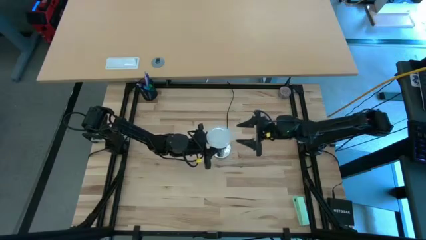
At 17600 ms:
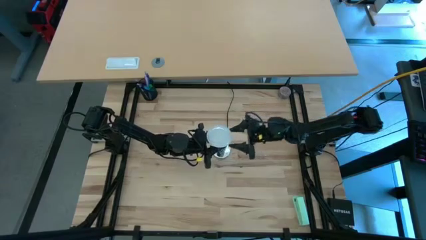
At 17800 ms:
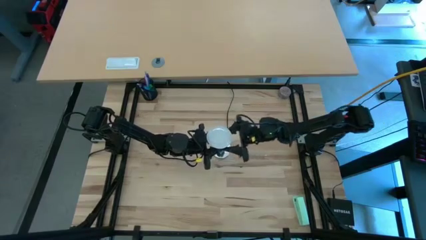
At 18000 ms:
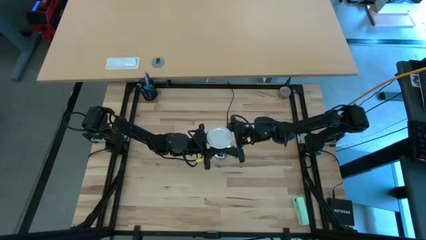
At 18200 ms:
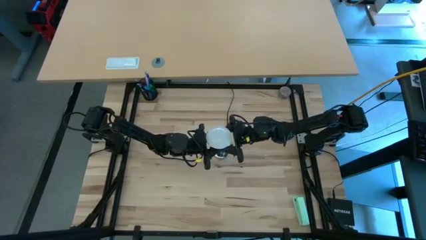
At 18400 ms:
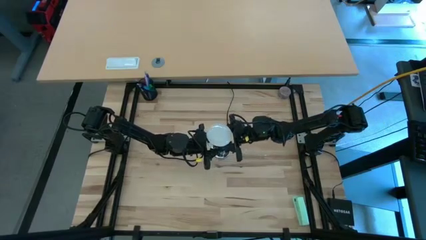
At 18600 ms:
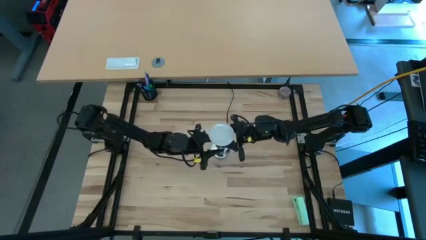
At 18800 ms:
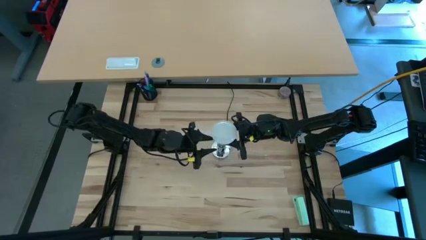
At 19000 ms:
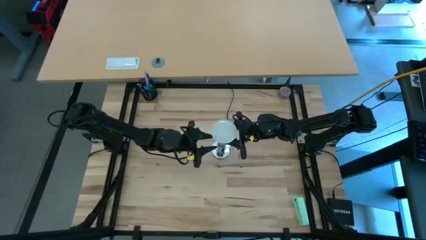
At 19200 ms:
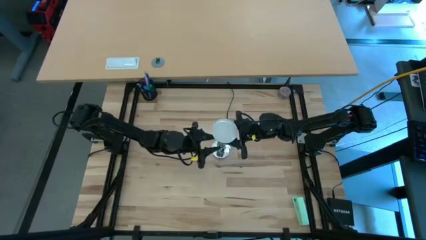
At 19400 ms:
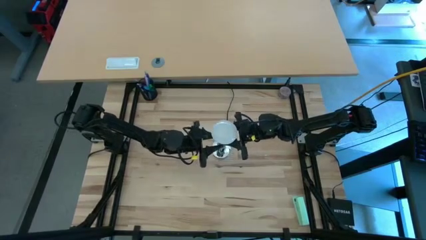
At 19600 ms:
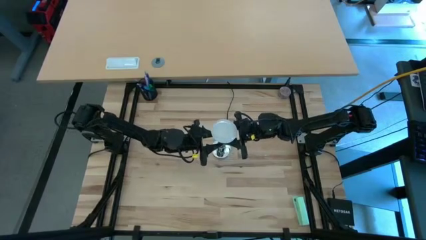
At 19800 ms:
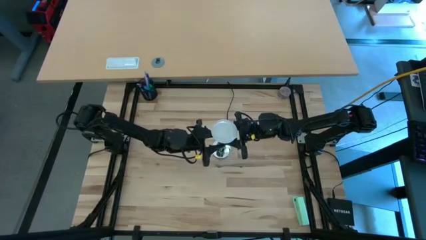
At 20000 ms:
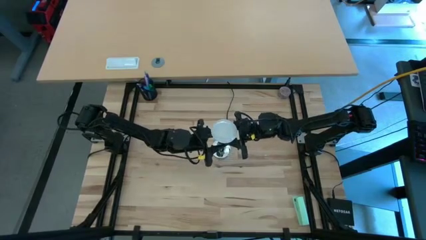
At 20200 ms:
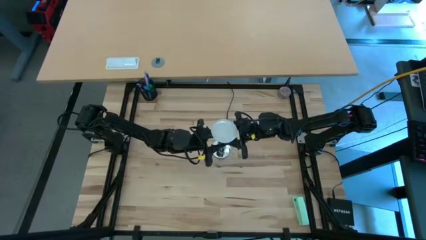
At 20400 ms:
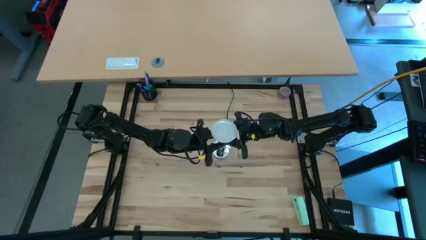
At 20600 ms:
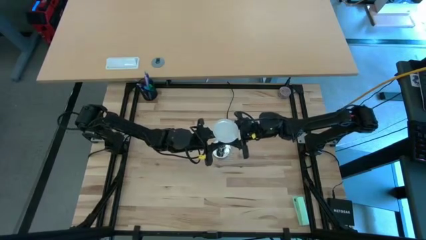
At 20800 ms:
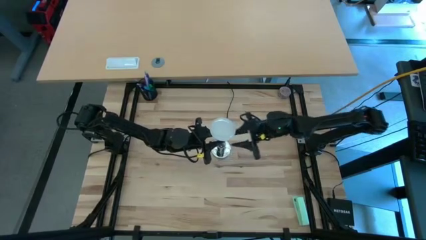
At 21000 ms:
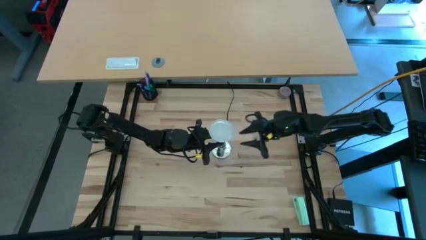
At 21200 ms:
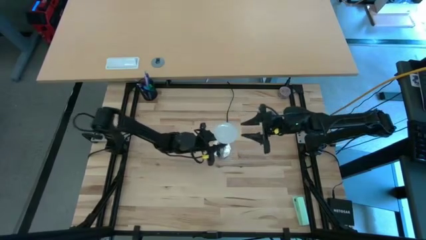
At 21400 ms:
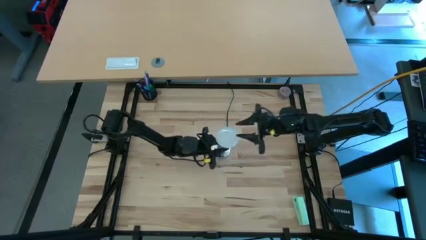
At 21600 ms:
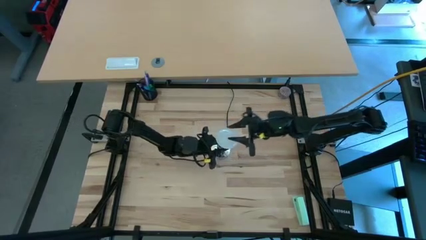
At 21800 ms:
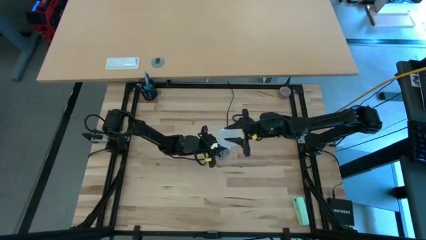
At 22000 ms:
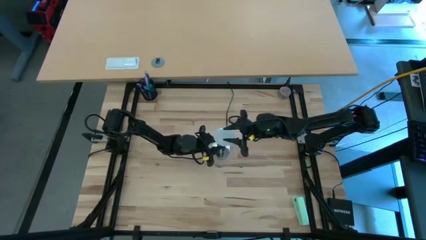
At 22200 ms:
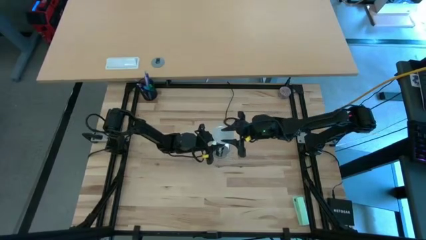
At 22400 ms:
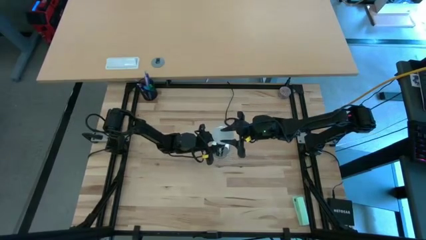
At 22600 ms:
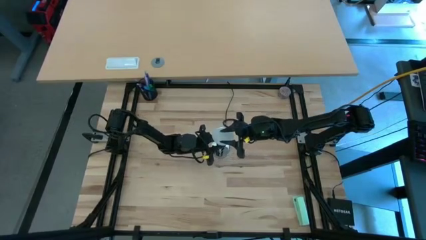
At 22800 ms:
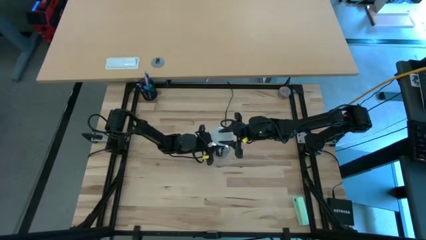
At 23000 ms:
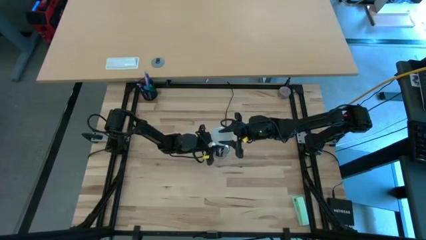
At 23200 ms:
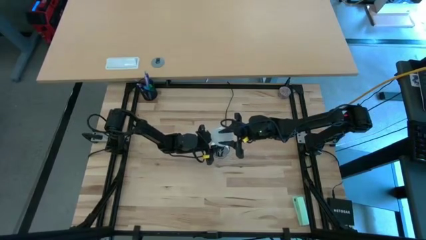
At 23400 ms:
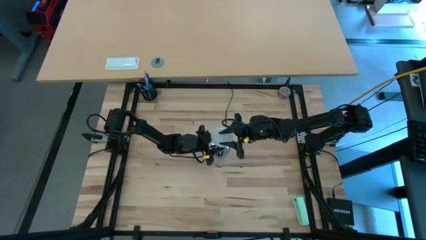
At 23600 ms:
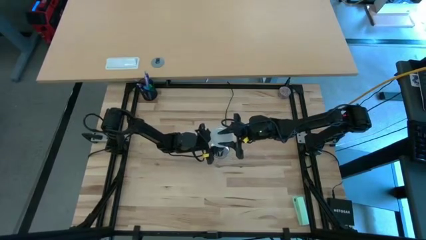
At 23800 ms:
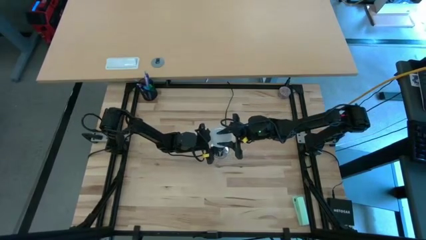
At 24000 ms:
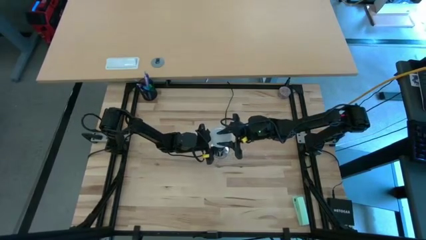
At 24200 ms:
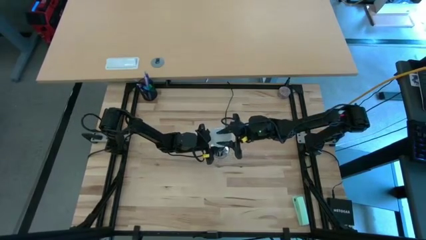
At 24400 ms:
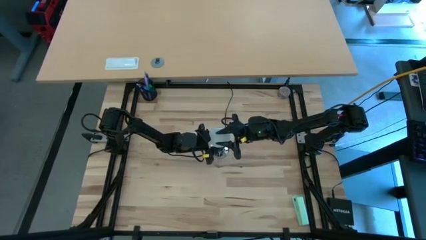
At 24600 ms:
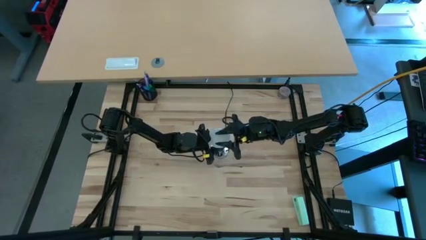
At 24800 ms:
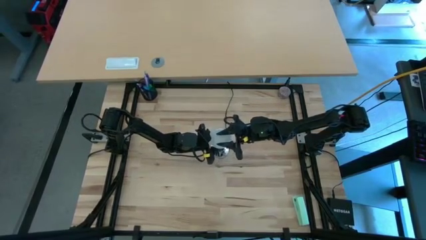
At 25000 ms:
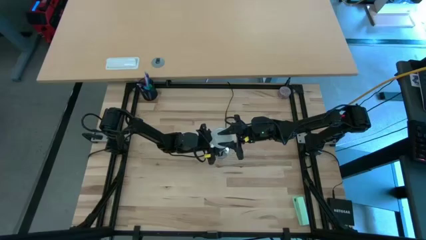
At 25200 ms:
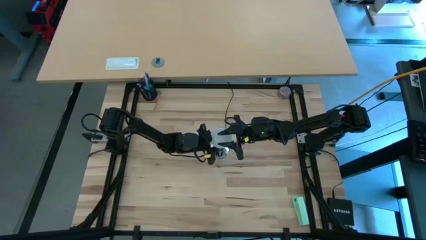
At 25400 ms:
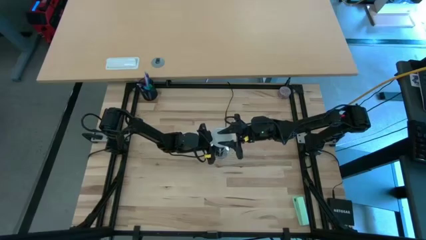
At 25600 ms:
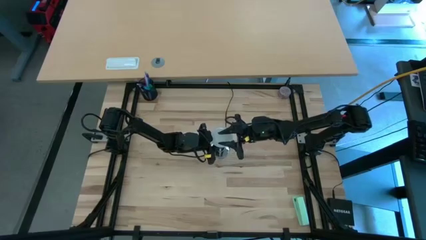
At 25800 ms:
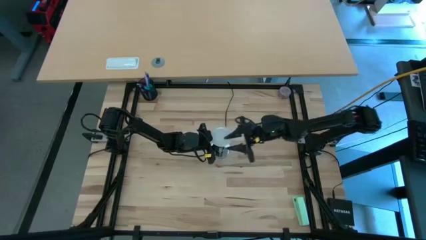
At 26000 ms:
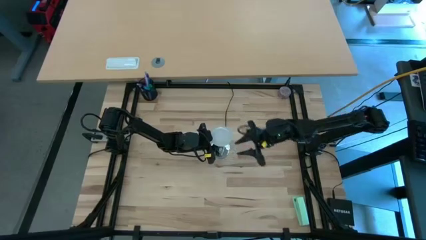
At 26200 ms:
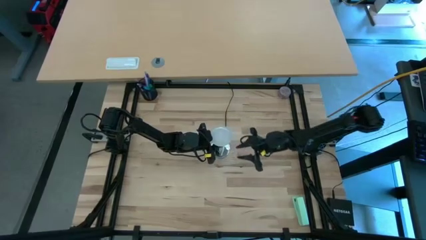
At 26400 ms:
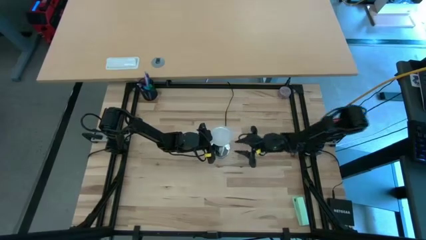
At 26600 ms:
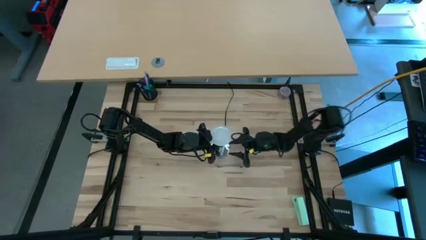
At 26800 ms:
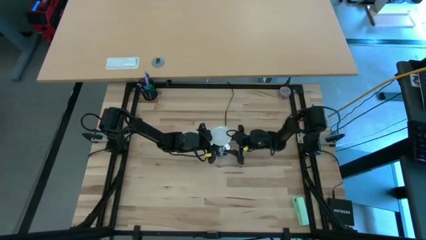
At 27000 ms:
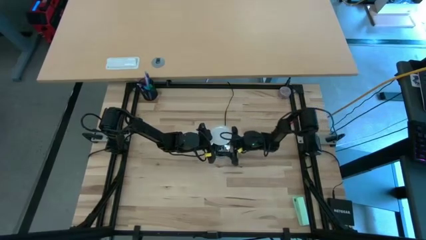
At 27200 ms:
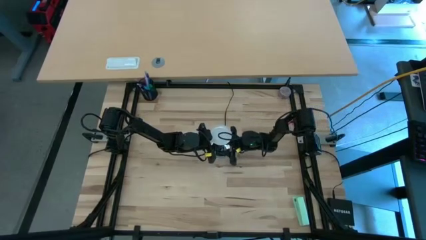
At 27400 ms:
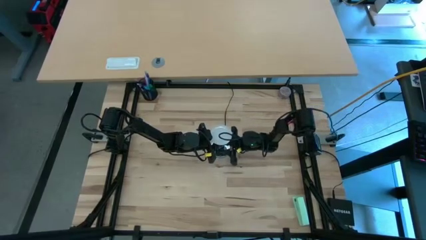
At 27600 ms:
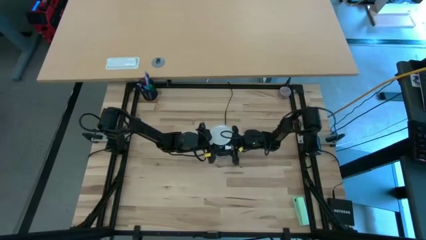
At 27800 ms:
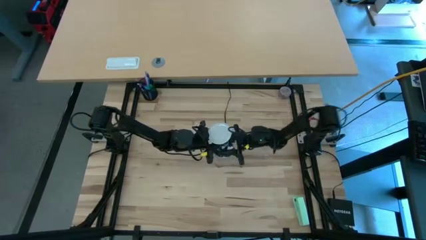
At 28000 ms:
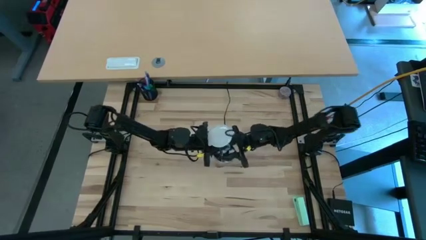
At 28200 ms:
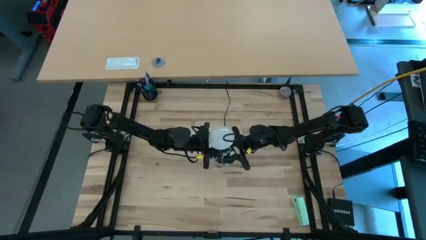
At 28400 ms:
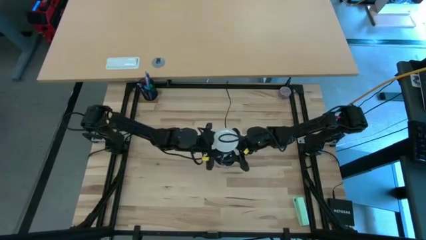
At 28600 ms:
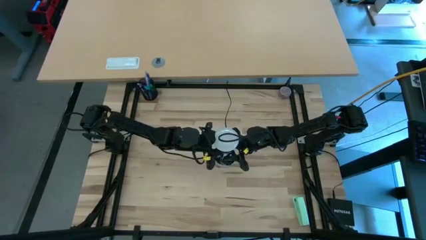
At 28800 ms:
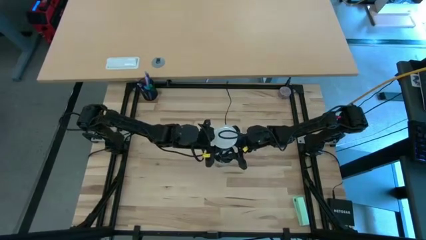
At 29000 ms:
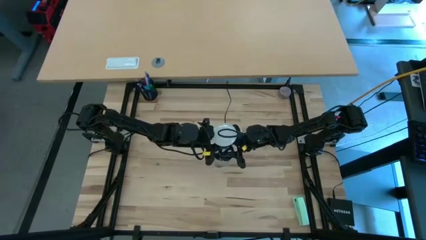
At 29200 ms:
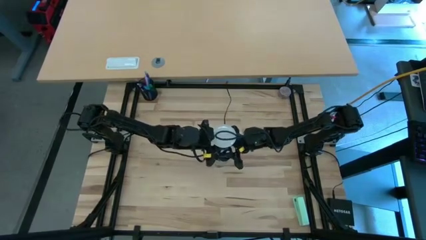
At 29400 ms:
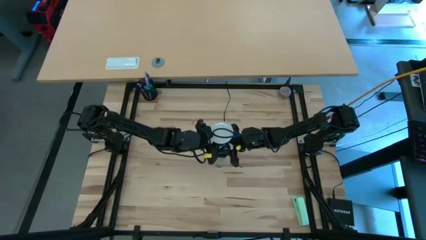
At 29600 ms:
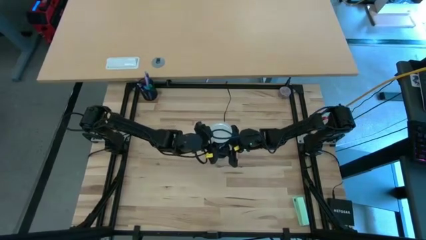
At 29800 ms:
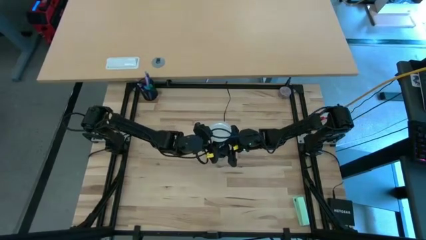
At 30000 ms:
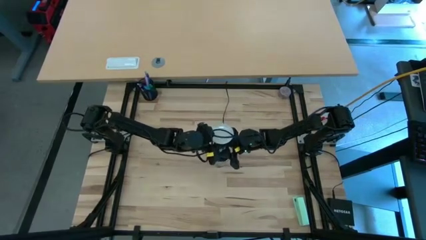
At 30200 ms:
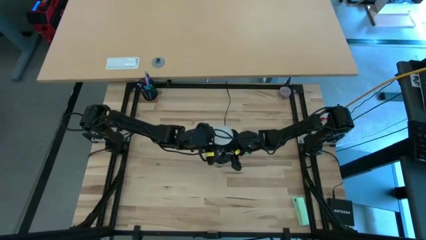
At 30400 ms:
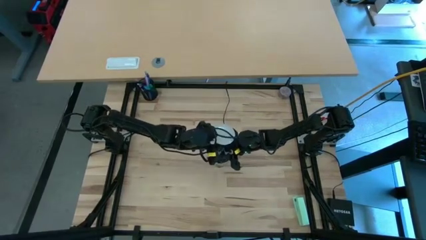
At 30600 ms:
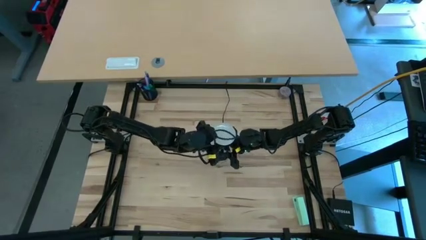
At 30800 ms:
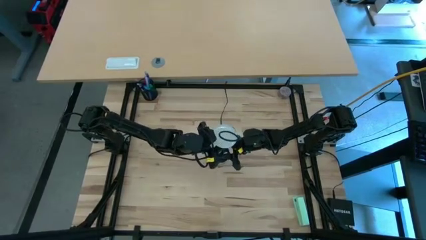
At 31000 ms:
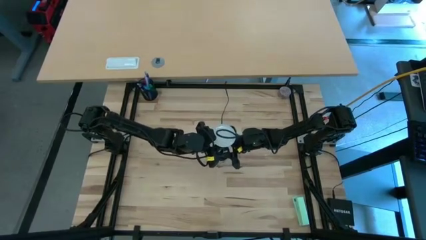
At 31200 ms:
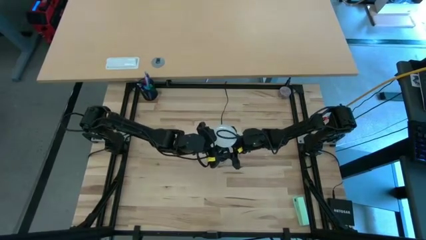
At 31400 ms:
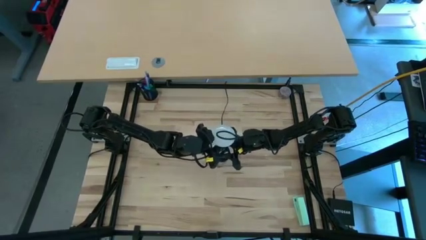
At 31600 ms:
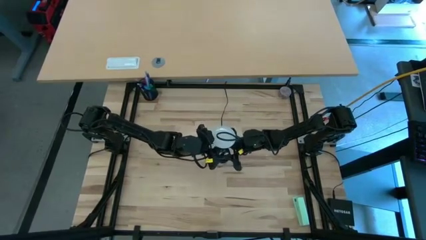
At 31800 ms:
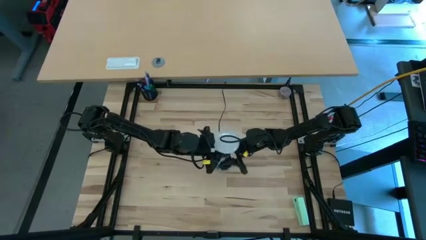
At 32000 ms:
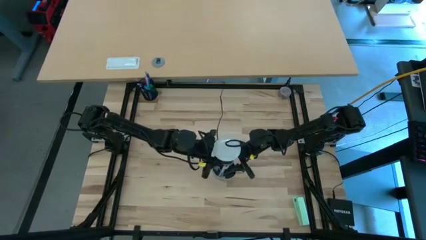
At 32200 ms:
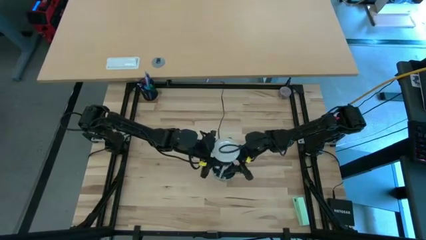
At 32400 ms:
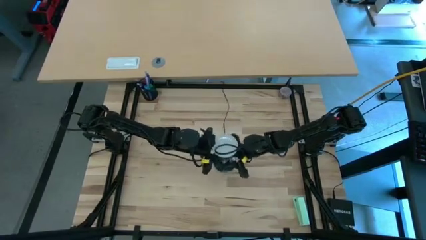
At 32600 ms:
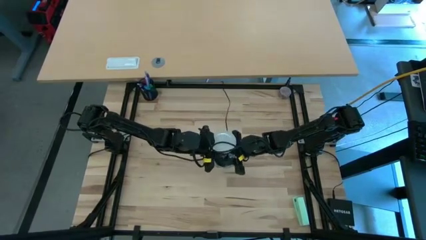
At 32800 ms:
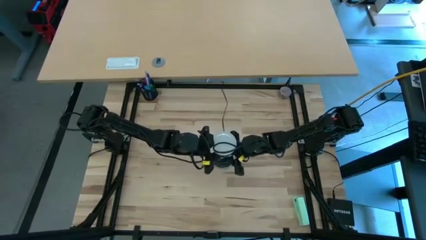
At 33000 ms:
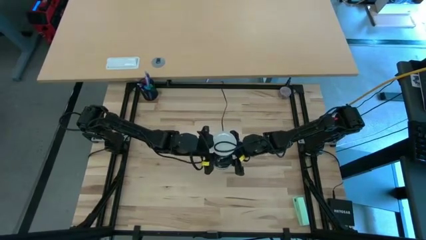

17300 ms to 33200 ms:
Task: Screw lightbulb
Insert the lightbulb into the lamp
